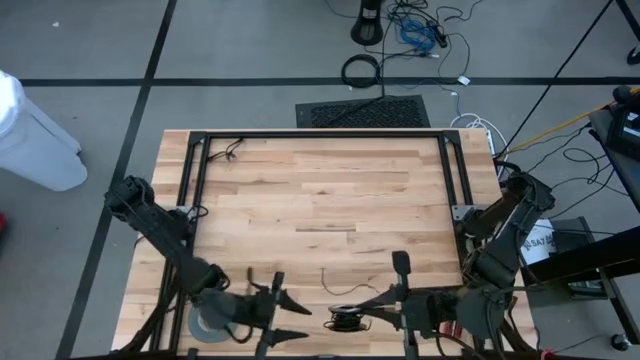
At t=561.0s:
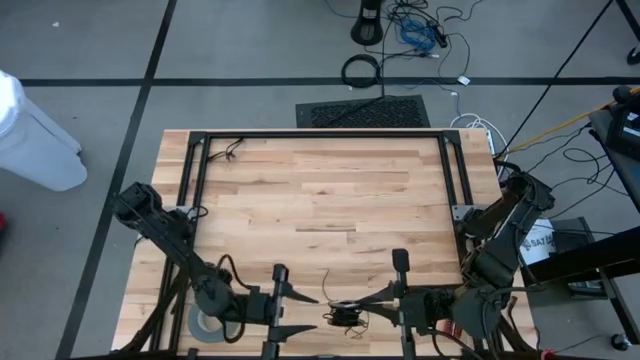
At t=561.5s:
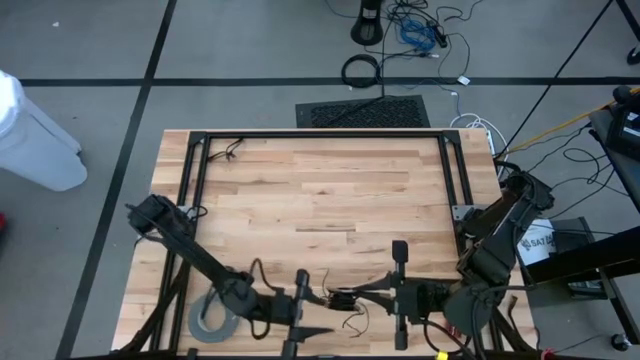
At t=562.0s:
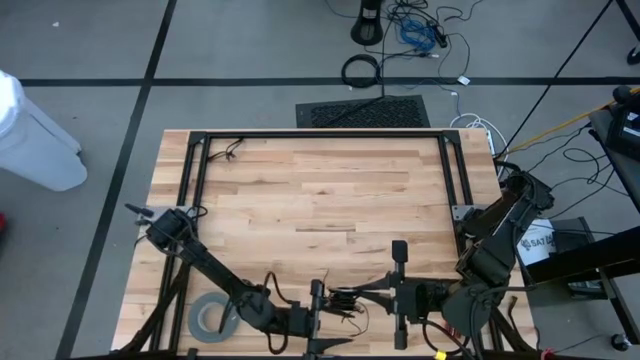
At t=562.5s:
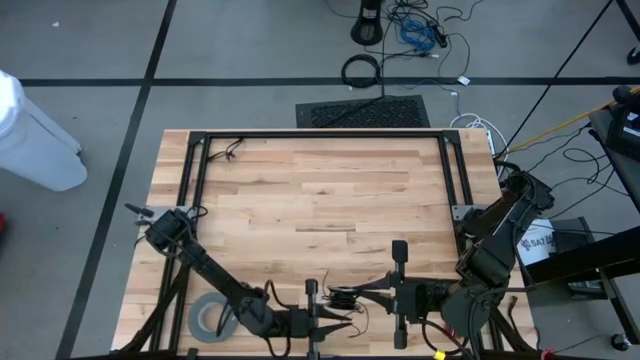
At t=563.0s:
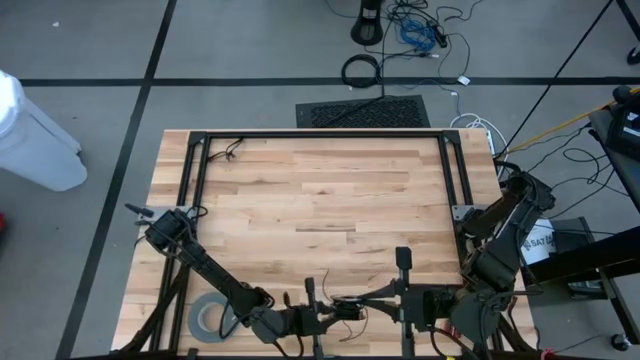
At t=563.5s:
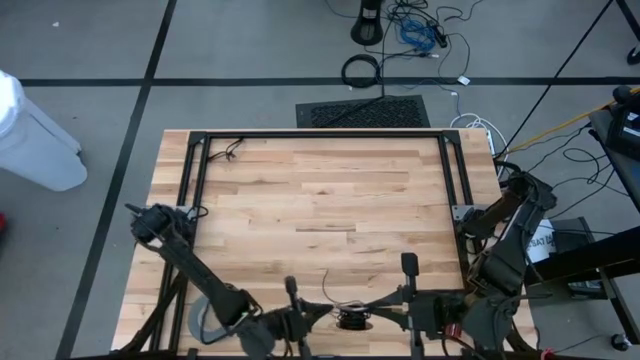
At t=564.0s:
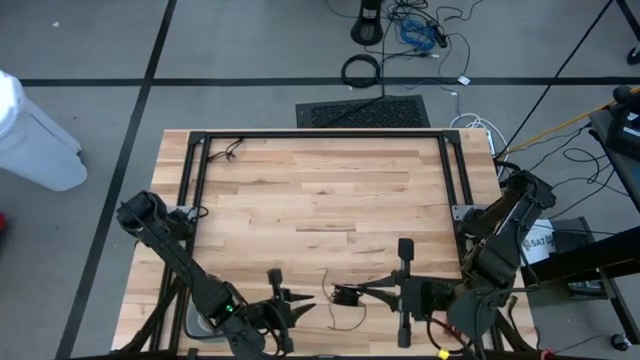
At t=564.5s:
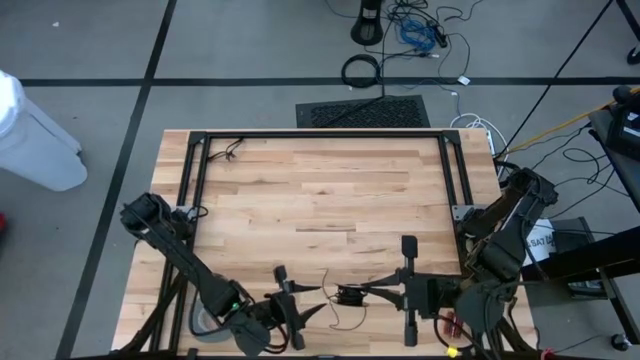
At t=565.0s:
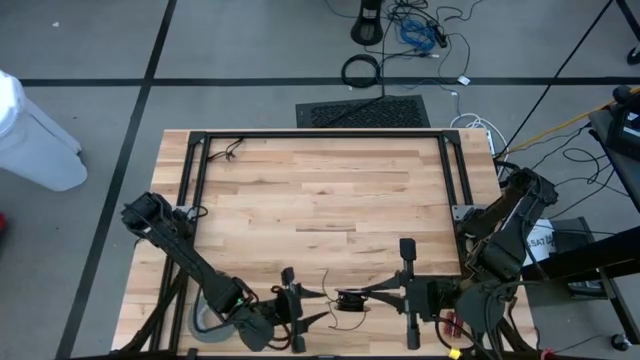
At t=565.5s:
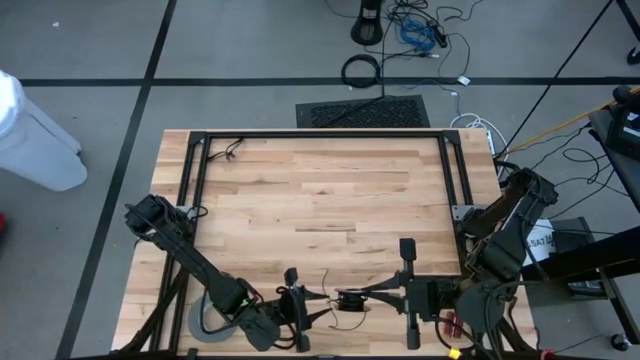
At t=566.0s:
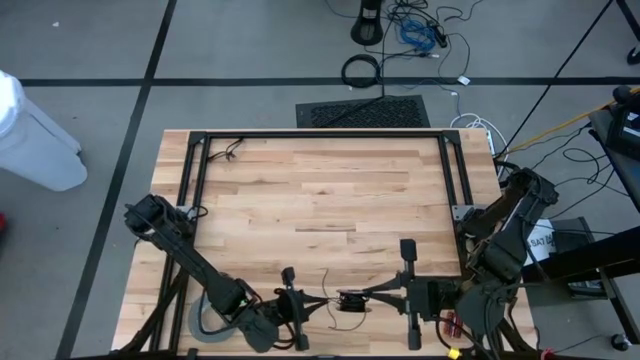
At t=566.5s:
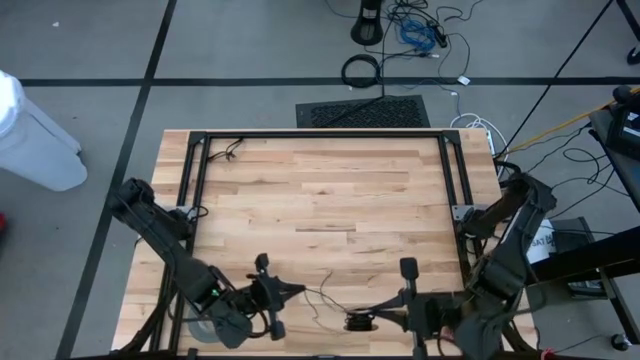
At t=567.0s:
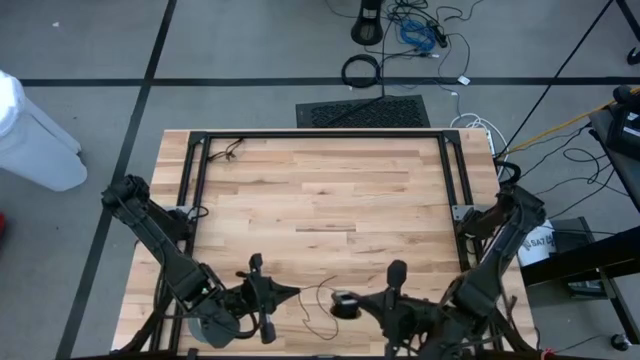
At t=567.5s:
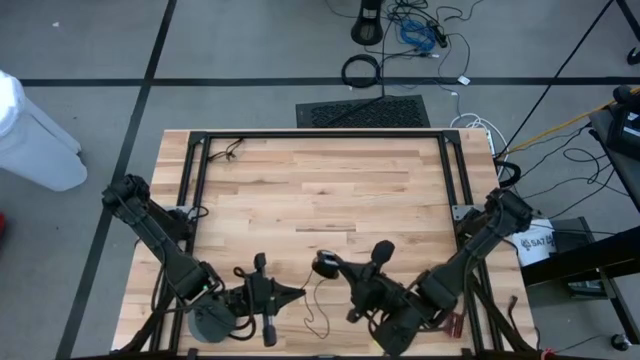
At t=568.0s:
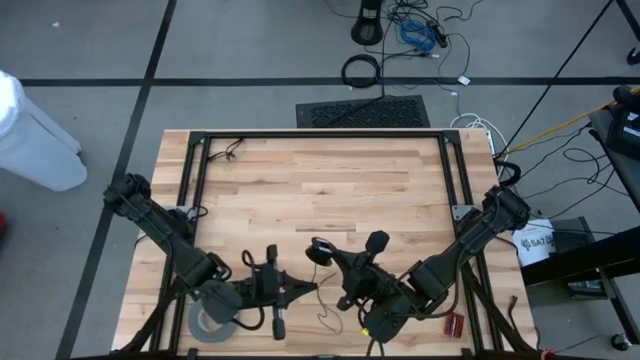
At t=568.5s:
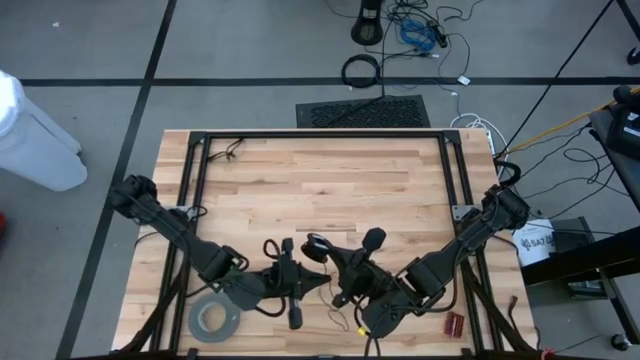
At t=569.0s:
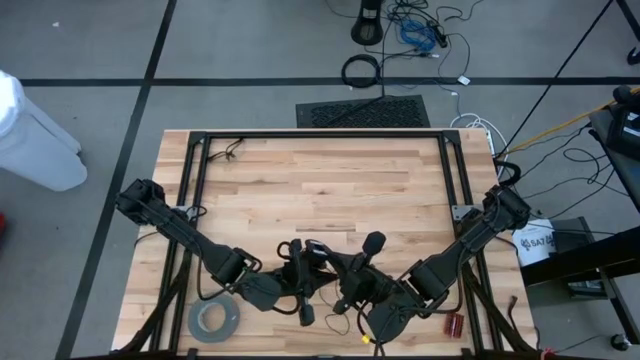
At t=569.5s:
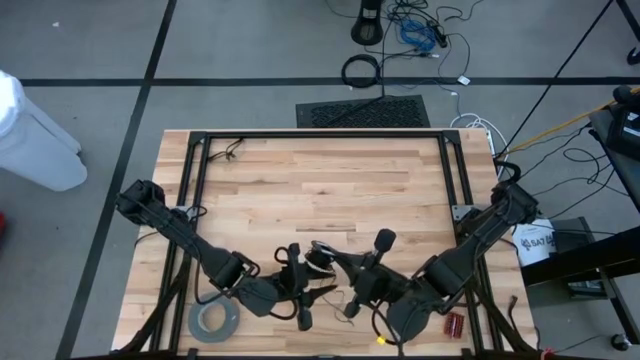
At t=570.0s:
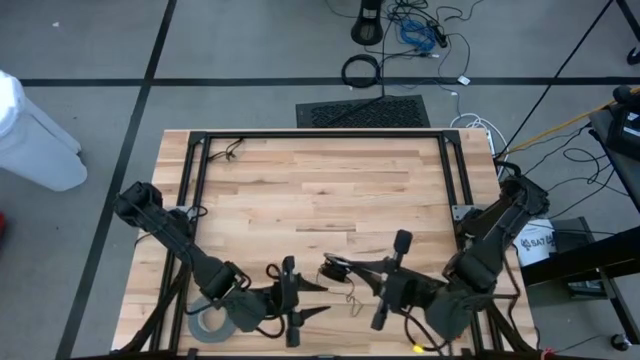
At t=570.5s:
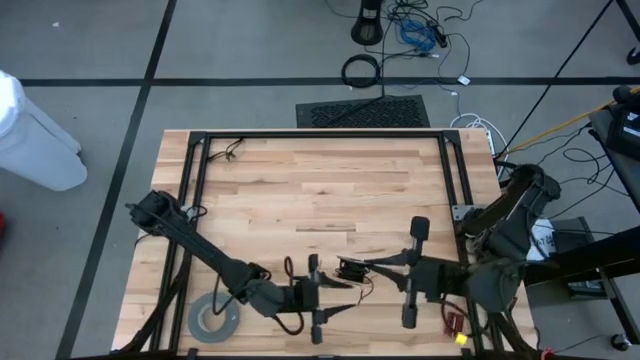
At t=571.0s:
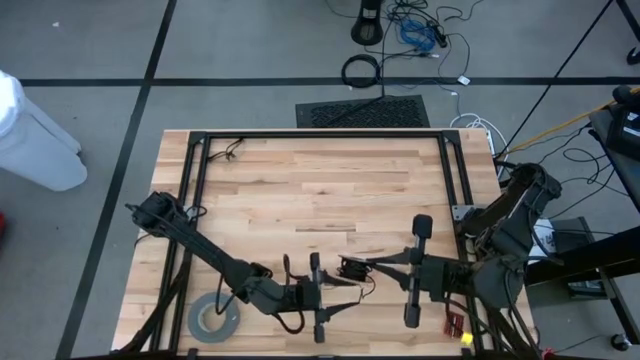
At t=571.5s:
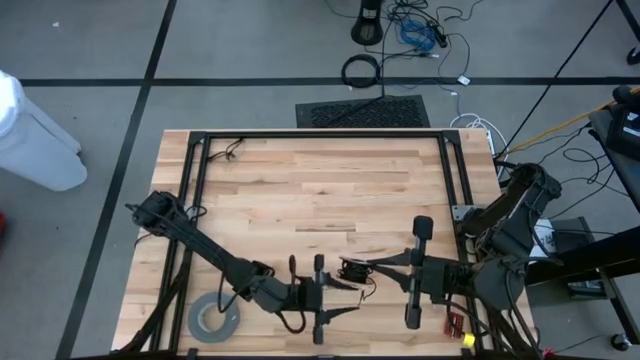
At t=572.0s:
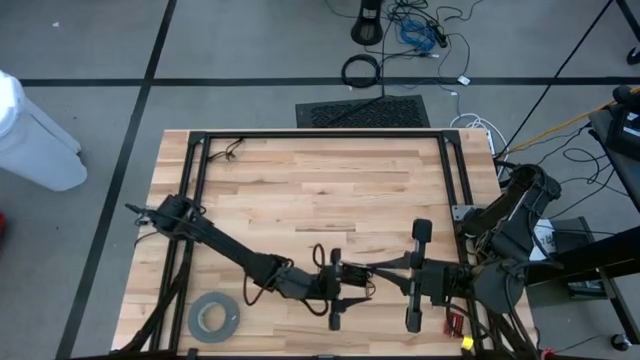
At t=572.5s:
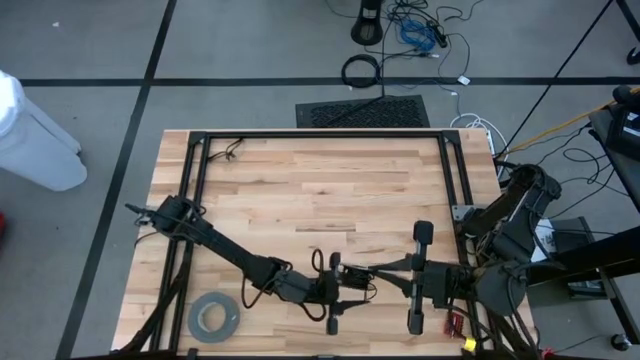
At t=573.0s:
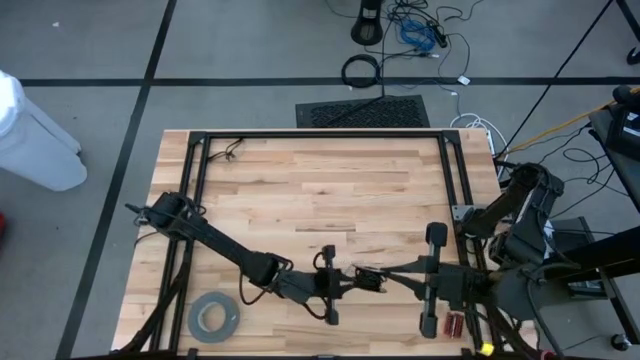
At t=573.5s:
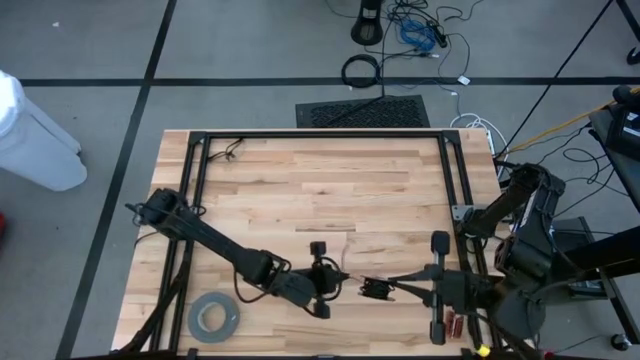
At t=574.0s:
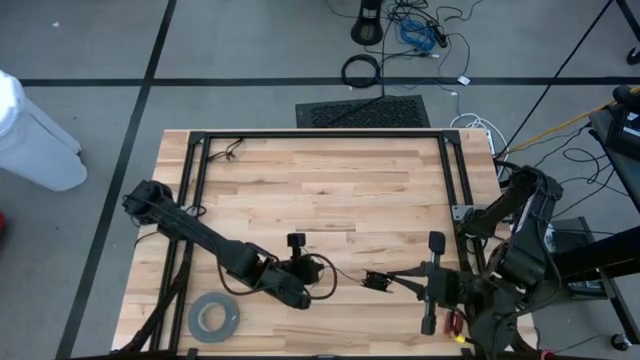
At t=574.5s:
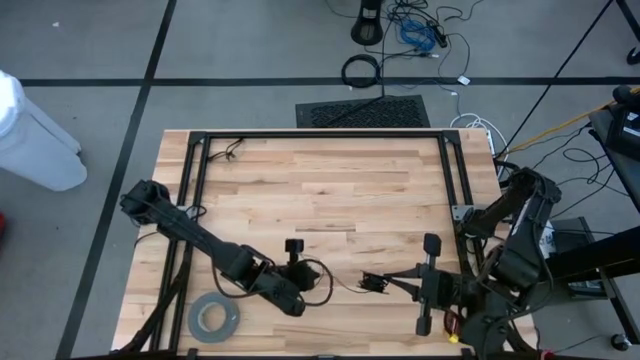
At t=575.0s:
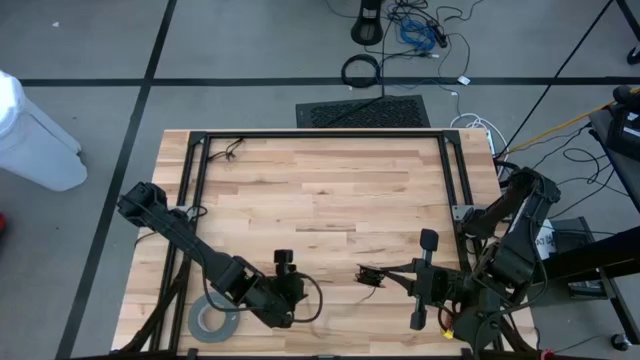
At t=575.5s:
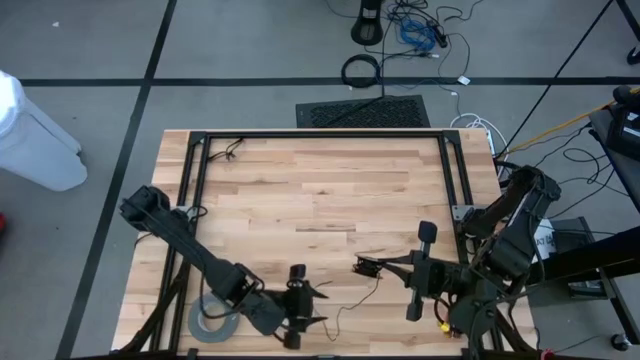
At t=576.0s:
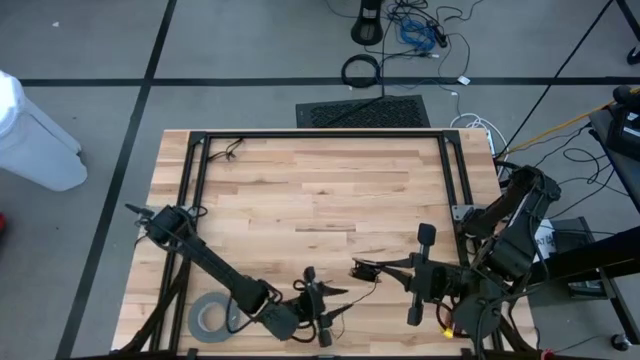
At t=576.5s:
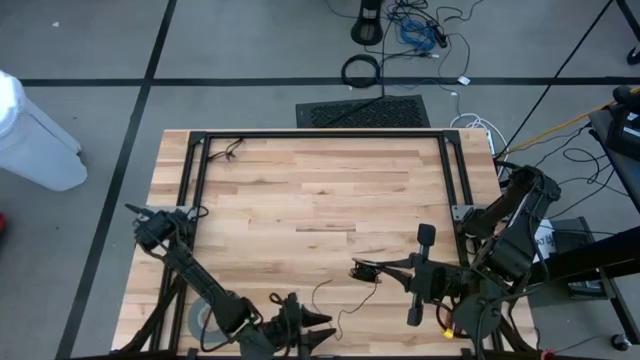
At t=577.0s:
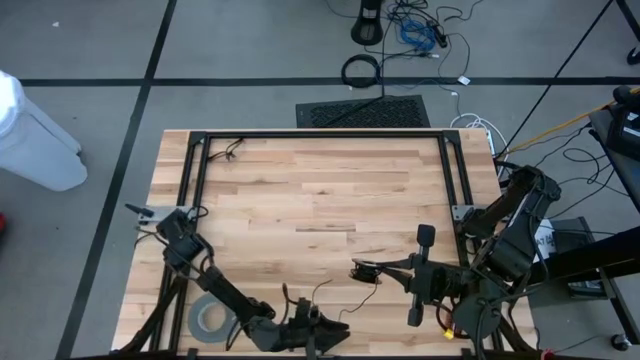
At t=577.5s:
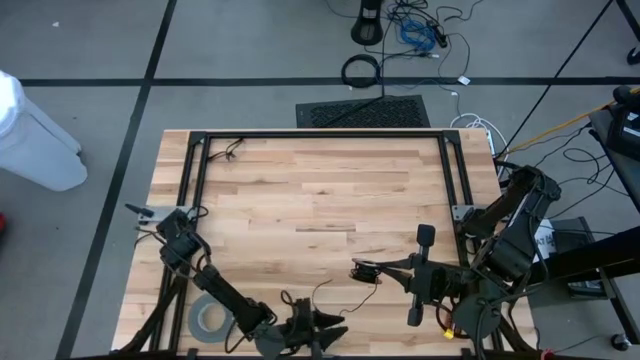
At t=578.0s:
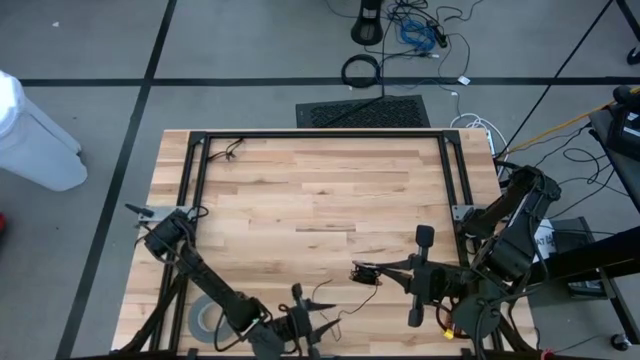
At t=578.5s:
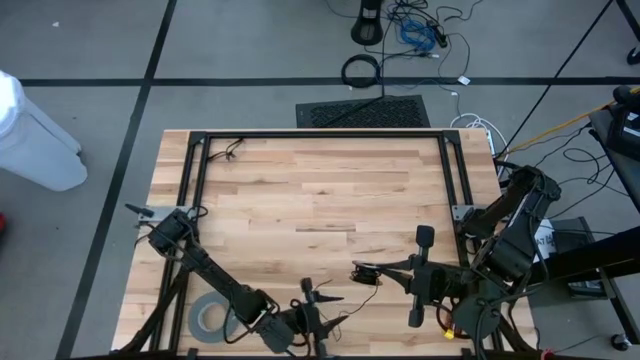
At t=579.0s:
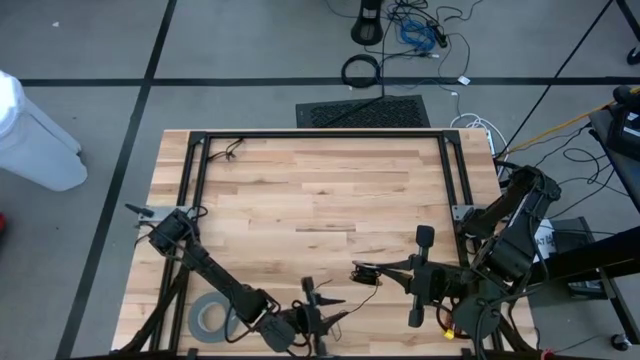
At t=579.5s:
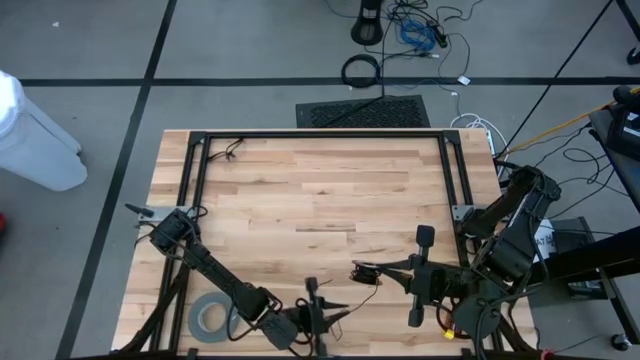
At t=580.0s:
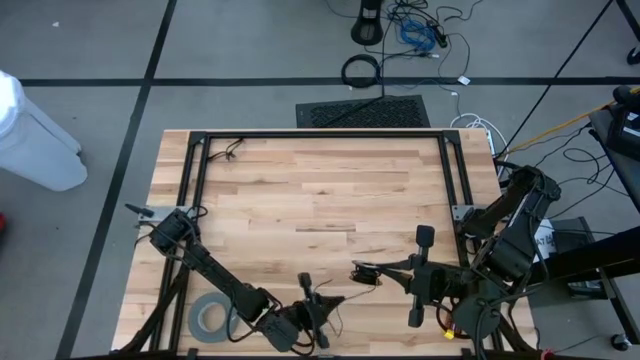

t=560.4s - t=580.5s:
Task: Coil cords
Coil the black wire onto the spool
